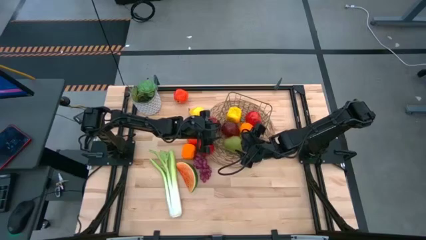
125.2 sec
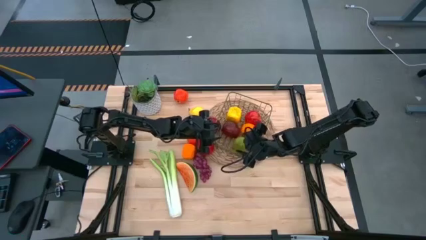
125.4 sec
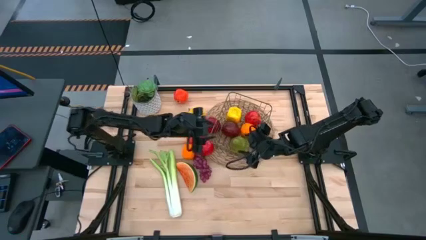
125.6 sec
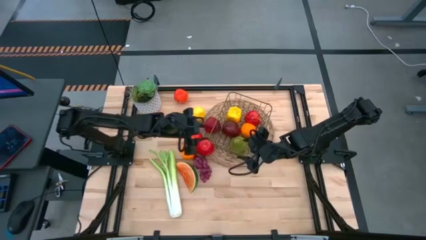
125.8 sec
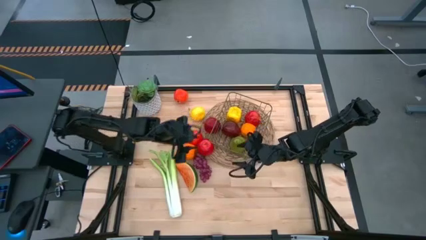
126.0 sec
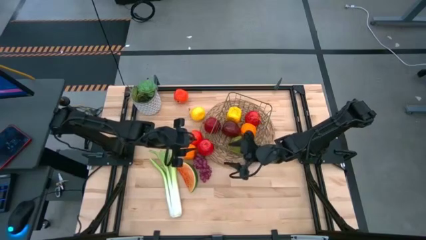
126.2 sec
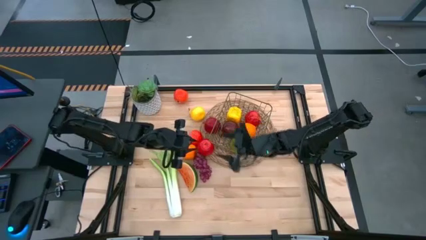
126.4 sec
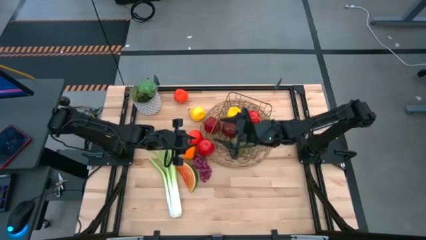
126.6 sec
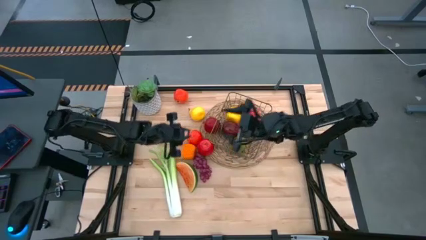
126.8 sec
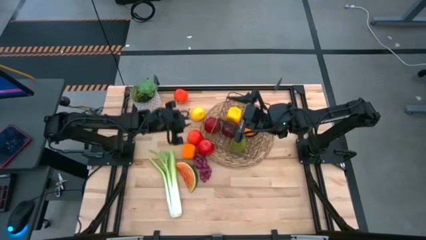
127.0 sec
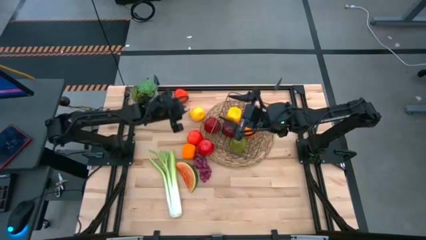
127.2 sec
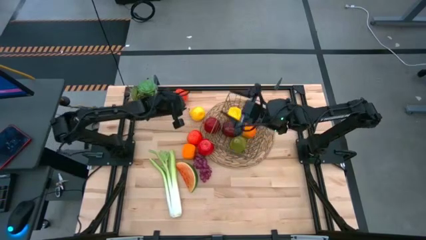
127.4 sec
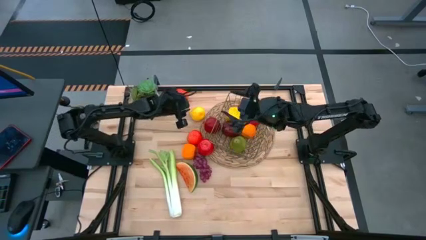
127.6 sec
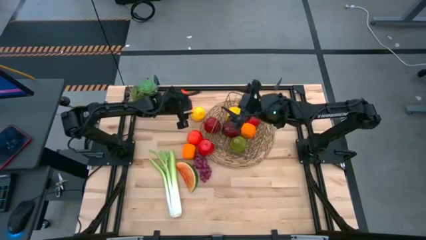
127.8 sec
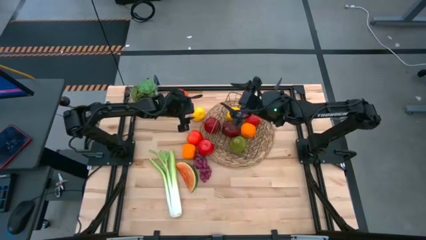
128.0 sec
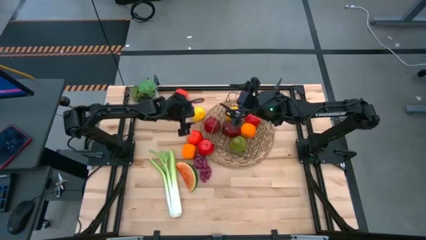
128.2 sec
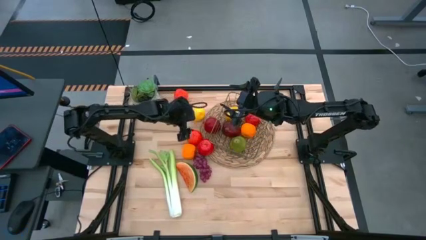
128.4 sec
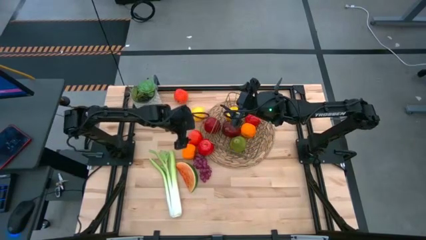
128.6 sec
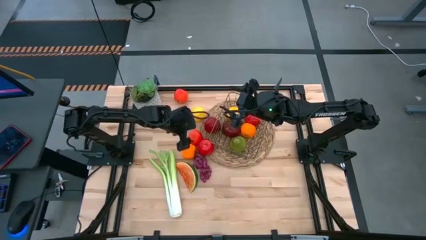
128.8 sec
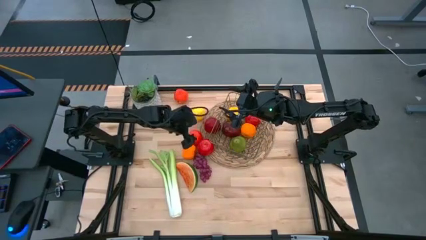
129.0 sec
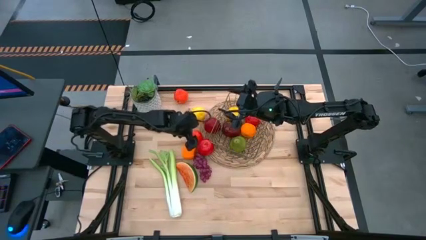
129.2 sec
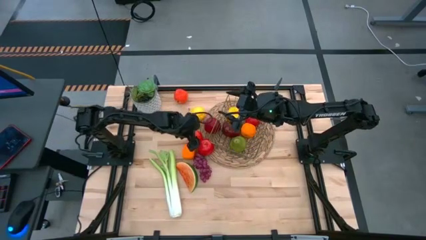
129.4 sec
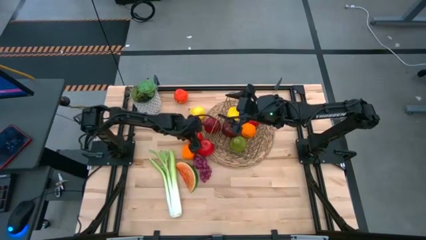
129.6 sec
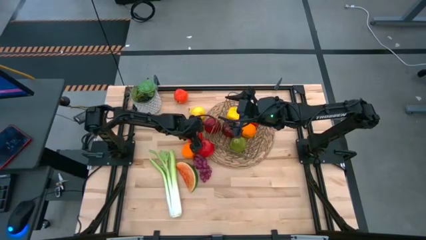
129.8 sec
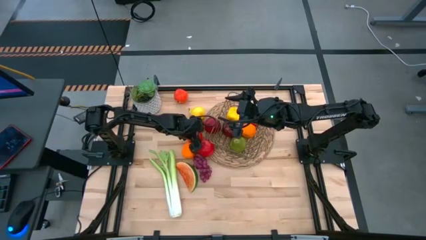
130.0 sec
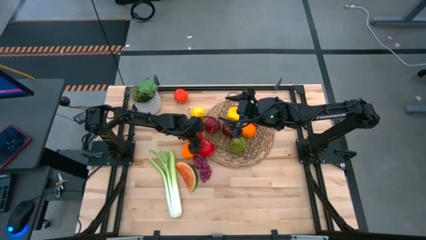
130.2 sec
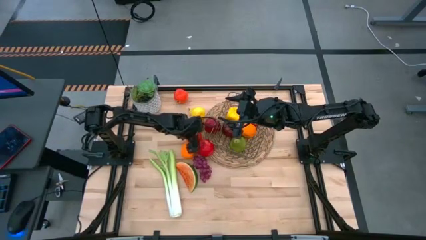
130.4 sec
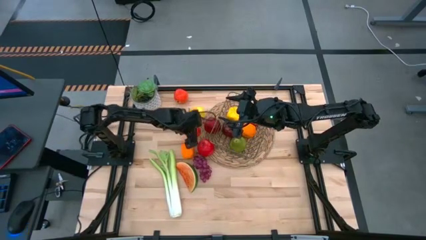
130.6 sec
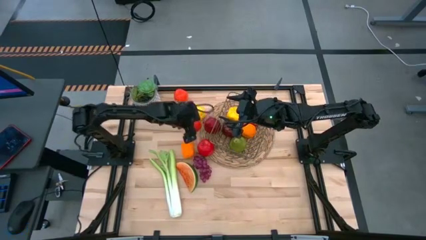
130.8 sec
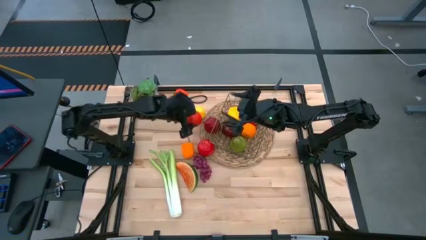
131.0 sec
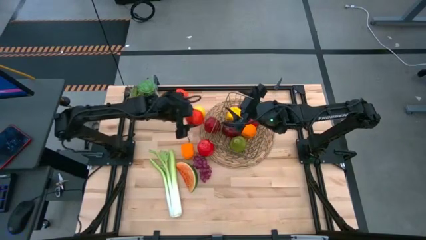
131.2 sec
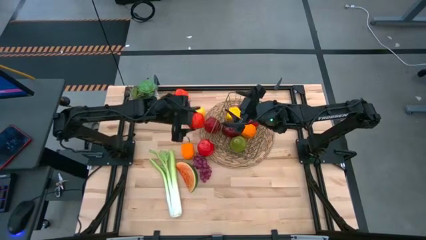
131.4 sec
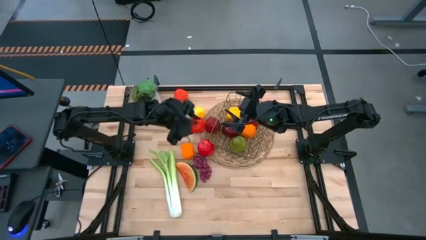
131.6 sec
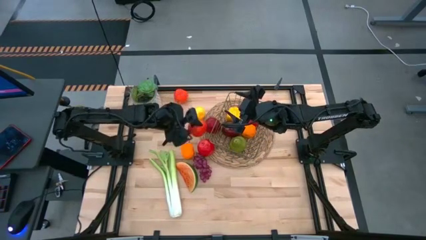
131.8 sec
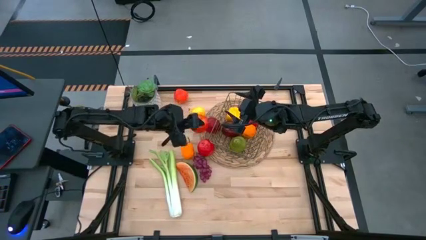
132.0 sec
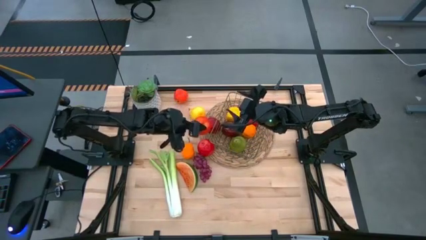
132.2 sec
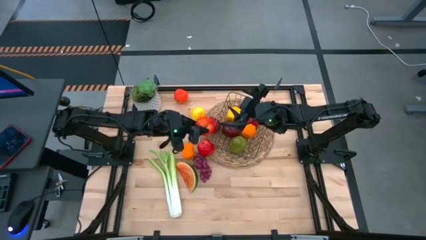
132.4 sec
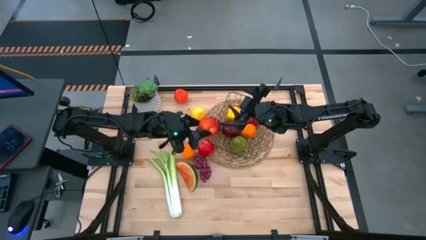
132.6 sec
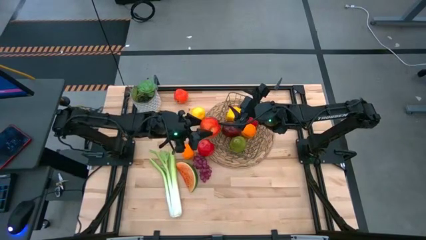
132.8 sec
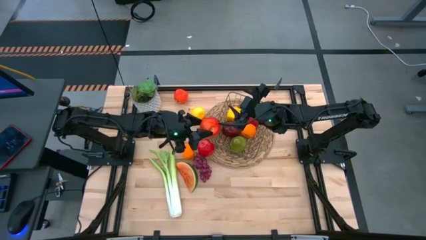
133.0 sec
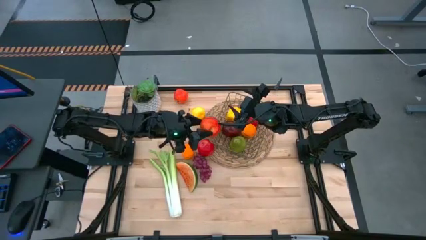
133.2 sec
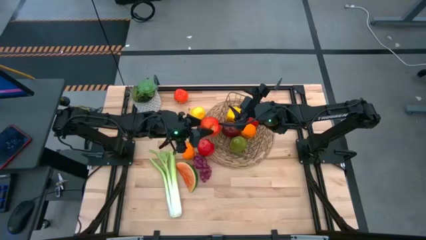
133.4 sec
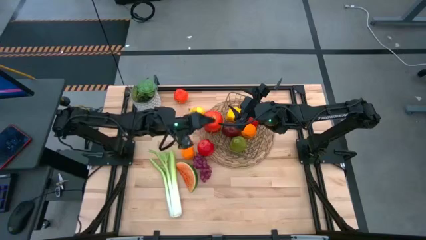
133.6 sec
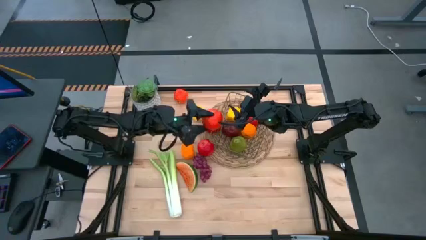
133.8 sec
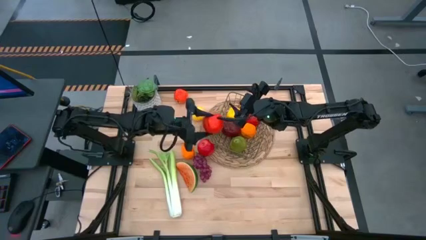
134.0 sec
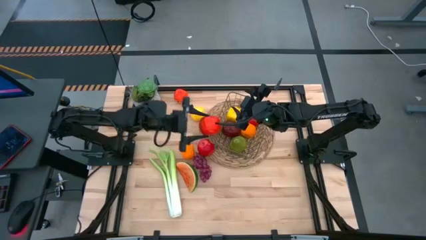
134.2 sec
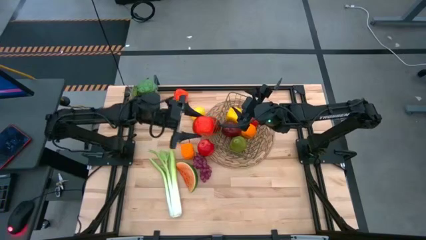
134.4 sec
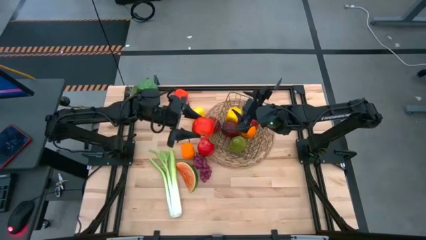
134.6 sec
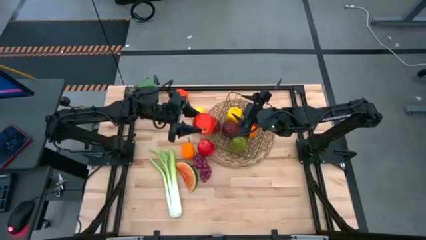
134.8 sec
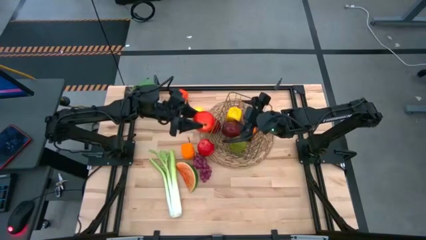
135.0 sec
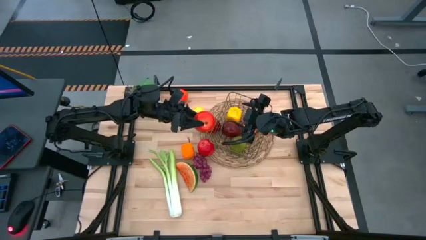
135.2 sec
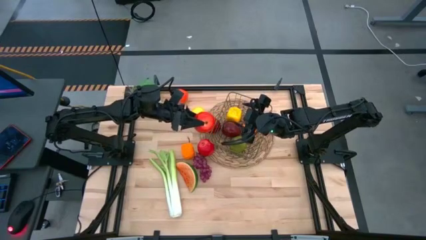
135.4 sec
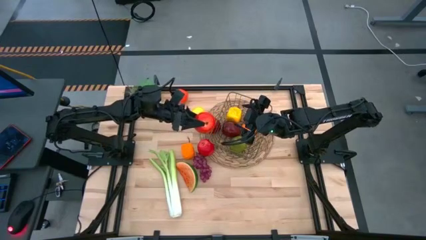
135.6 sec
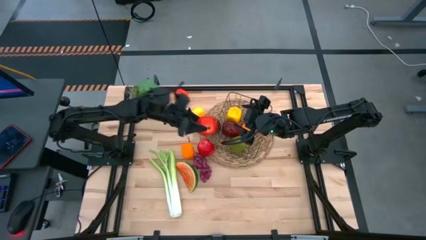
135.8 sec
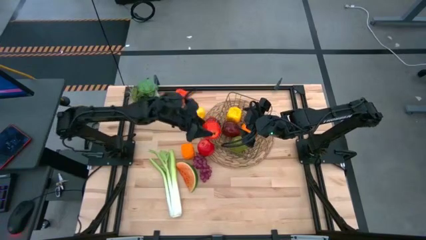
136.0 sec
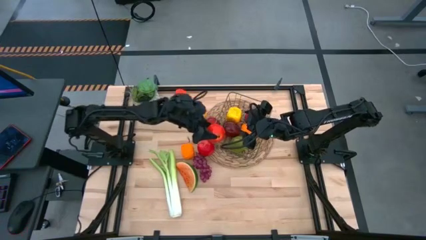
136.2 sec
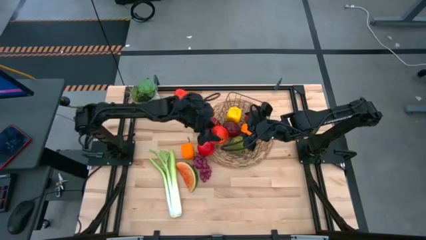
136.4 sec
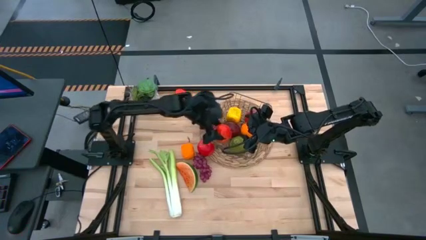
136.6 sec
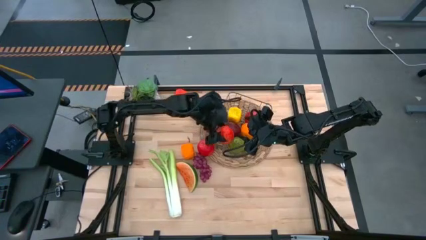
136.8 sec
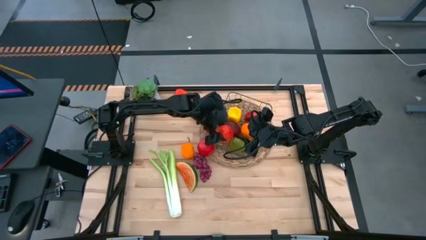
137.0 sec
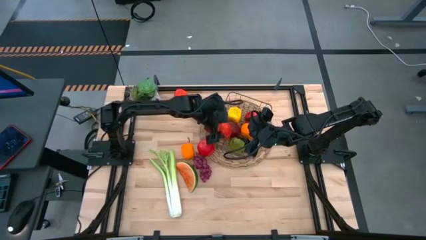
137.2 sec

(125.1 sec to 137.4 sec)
Task: Build produce basket
Put the red apple into the gold wire basket

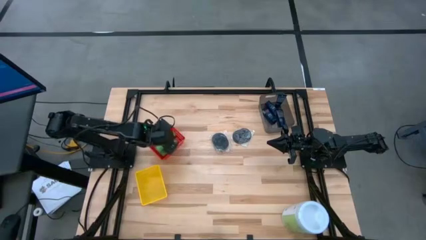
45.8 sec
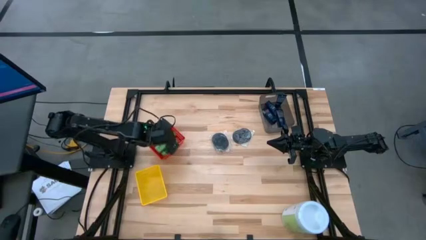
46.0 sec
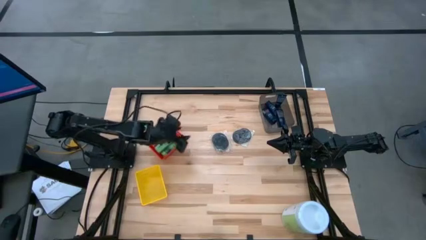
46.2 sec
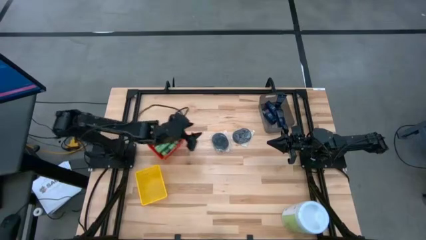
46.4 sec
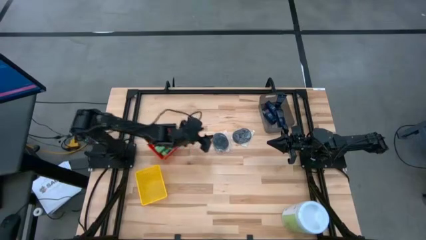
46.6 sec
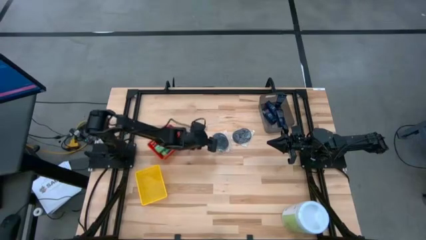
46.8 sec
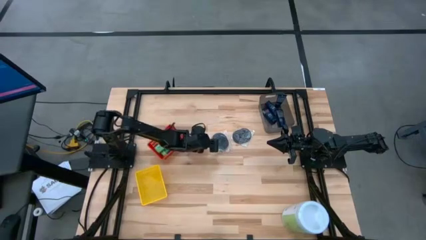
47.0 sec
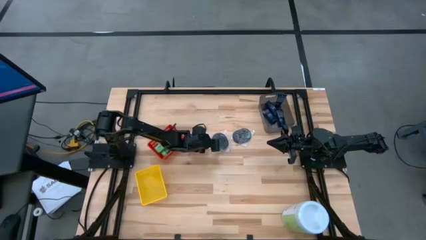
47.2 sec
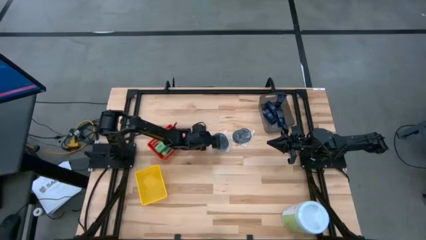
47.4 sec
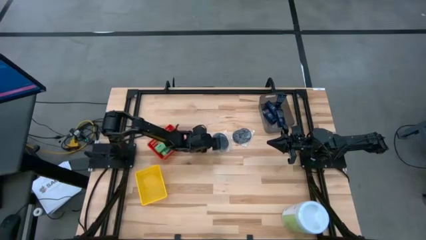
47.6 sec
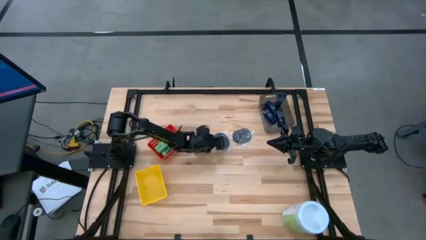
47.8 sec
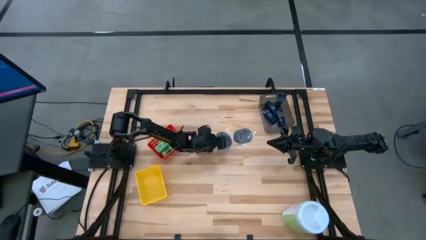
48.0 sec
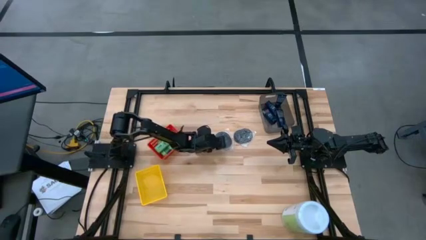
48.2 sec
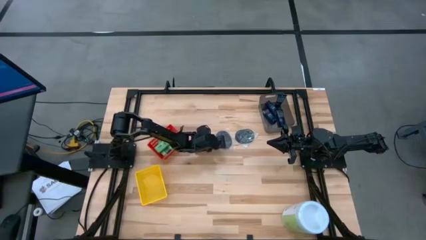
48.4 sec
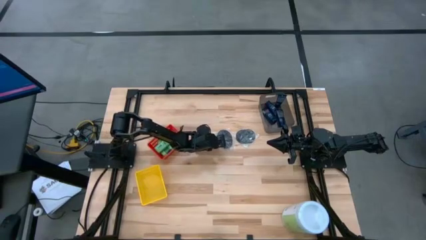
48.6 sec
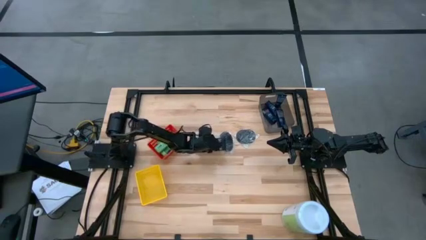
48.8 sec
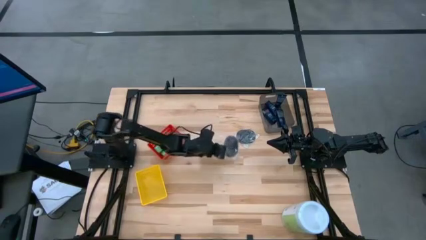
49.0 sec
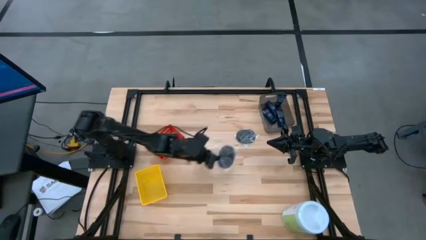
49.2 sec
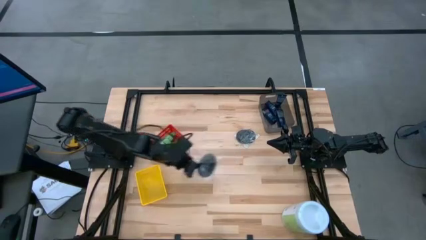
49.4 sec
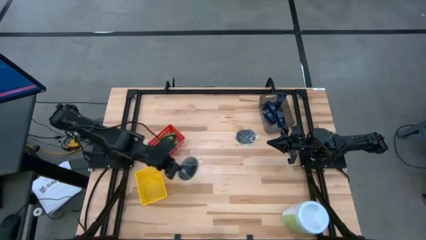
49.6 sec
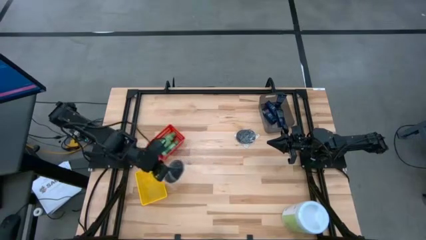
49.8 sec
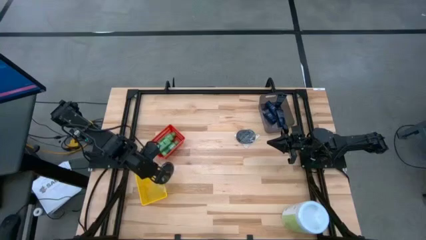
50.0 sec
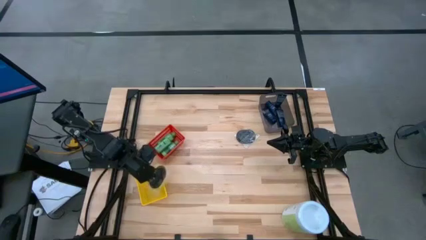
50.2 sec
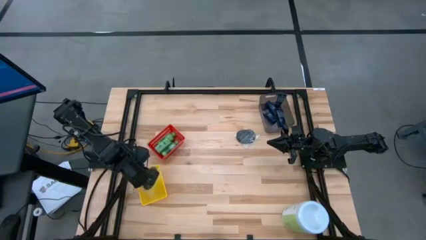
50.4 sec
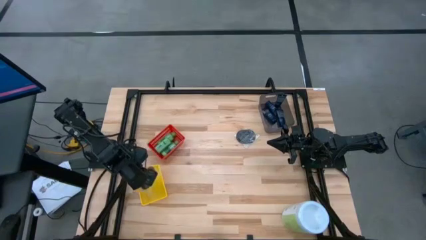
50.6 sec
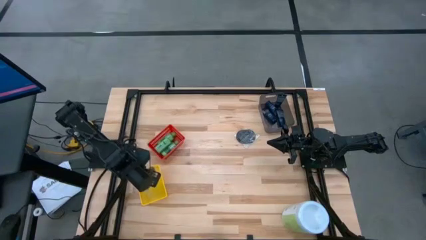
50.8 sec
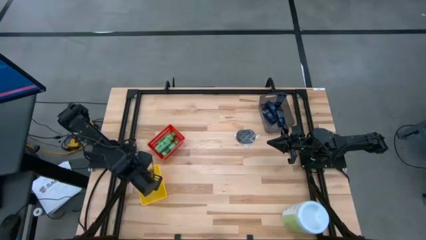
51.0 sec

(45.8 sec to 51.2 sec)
Task: Pick & Place Travel size toiletries
Put the left brush into the yellow bin

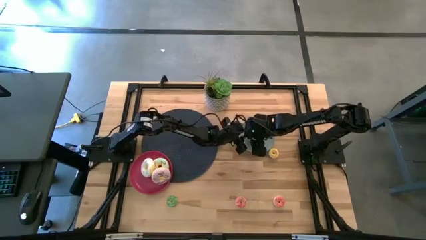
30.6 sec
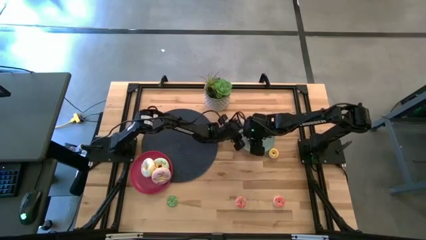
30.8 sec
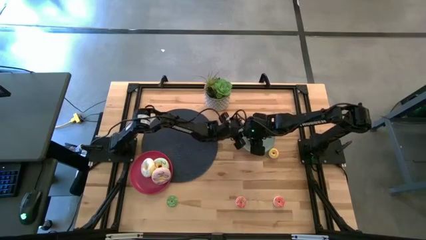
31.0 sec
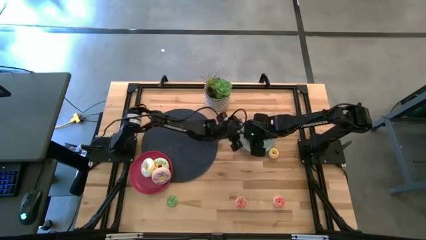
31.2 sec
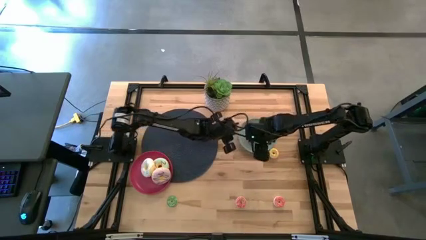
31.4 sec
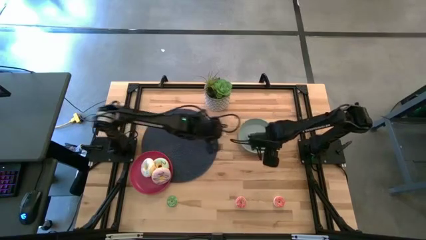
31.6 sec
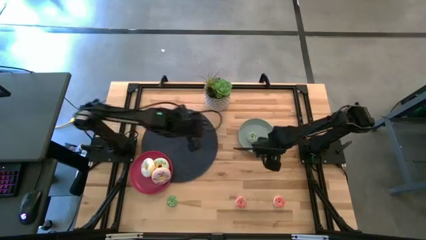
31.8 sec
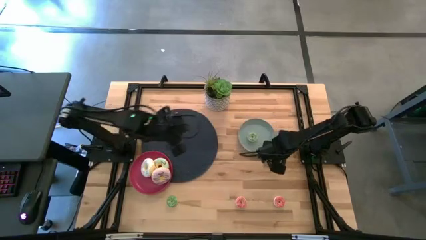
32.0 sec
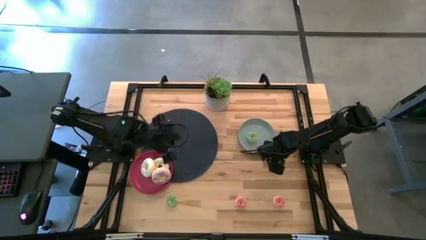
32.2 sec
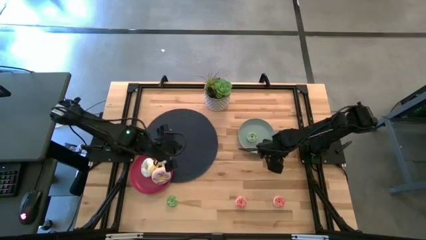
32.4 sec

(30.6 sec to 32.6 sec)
Task: Pick & Place donuts
Put the small yellow donut on the blue plate
